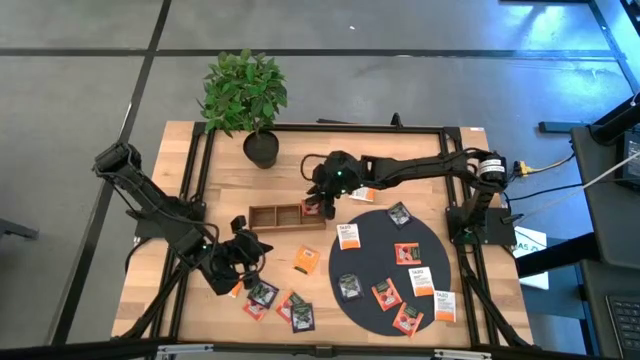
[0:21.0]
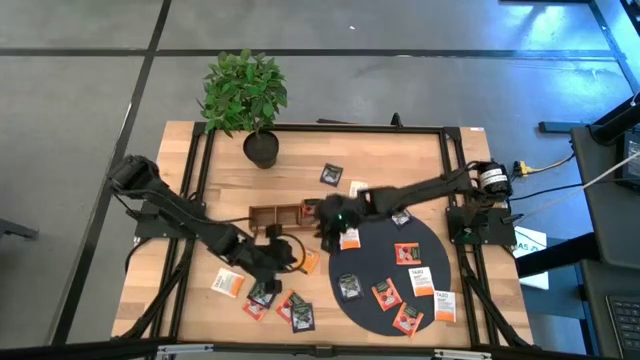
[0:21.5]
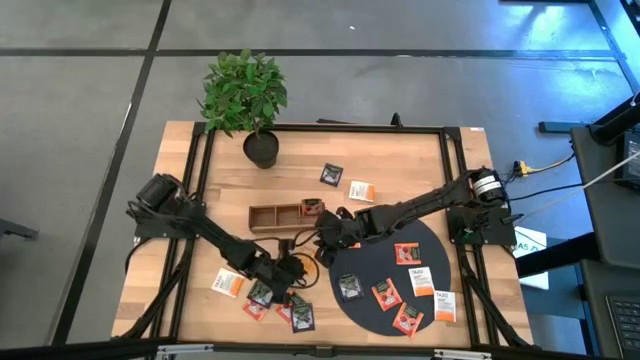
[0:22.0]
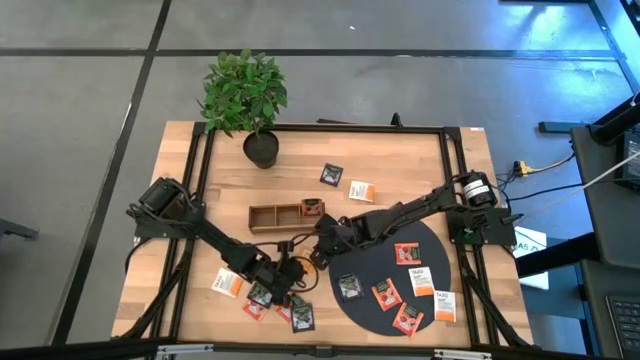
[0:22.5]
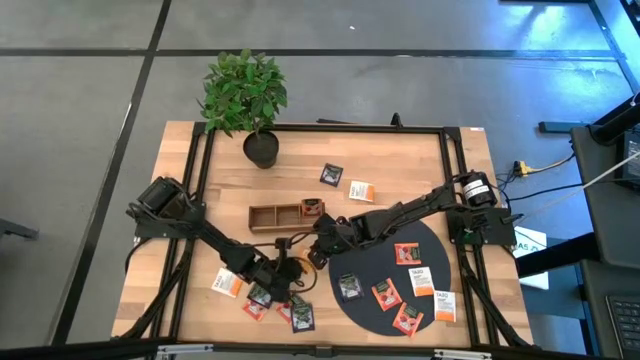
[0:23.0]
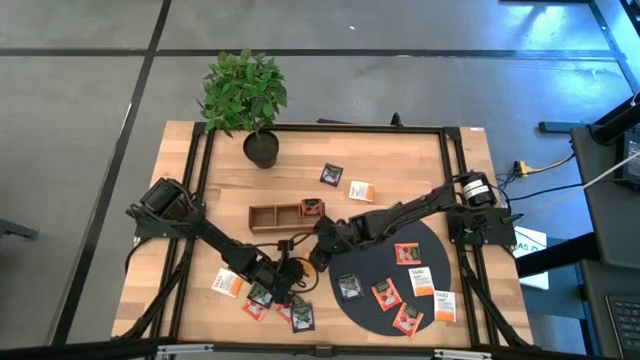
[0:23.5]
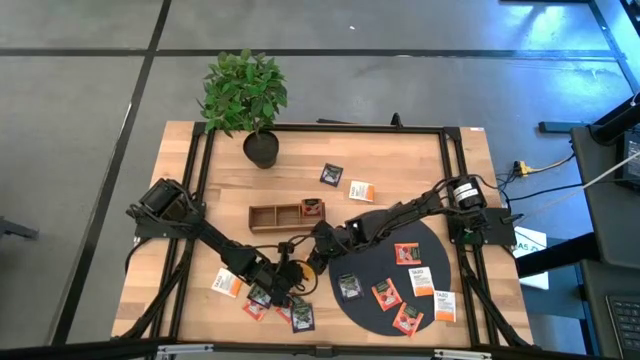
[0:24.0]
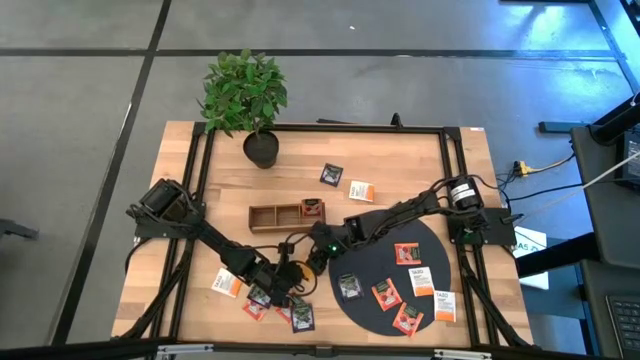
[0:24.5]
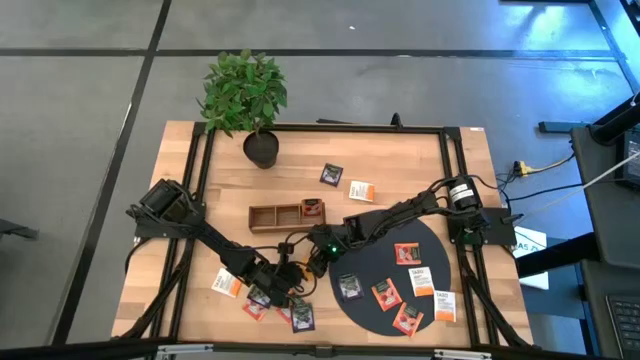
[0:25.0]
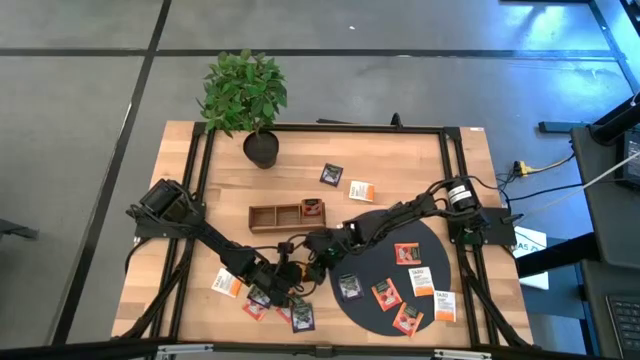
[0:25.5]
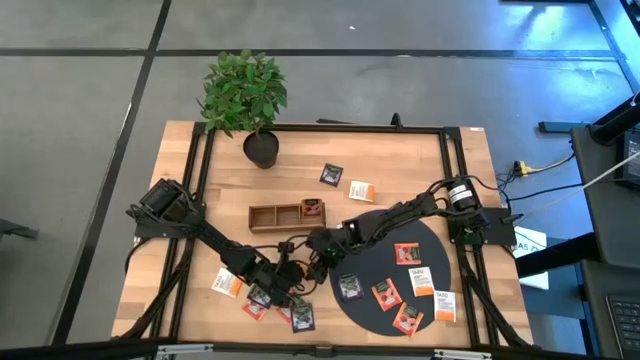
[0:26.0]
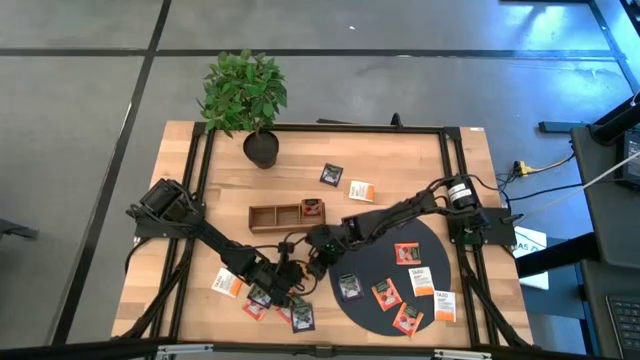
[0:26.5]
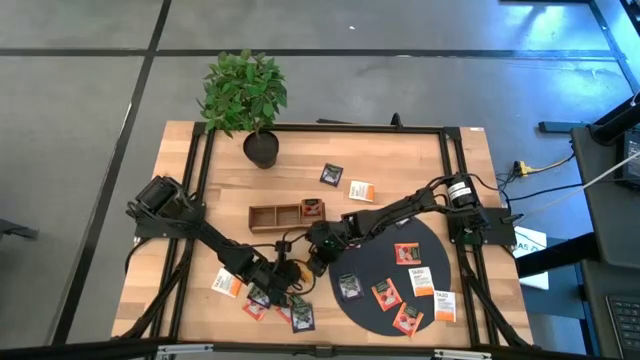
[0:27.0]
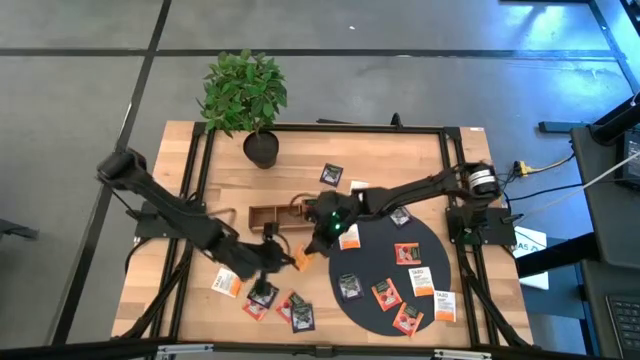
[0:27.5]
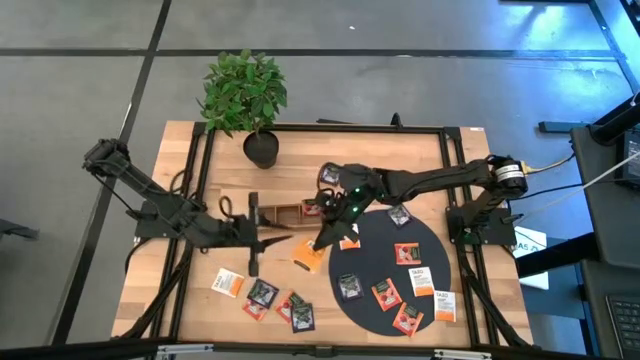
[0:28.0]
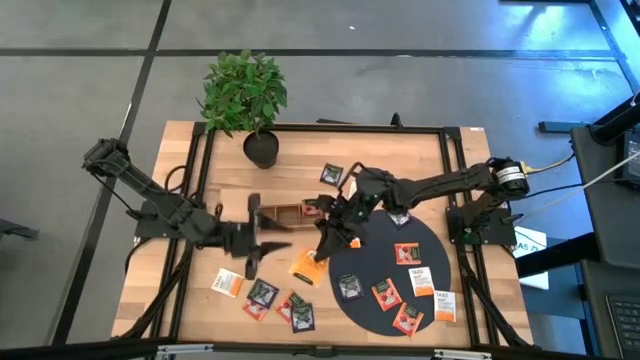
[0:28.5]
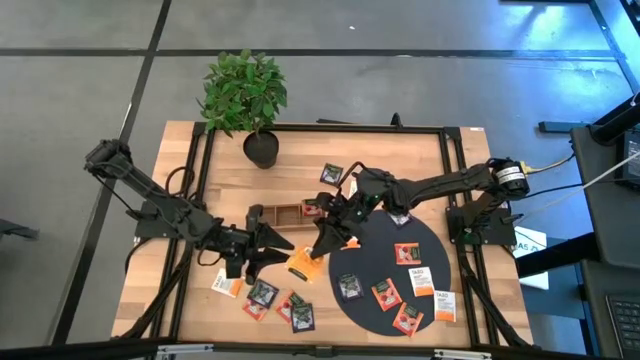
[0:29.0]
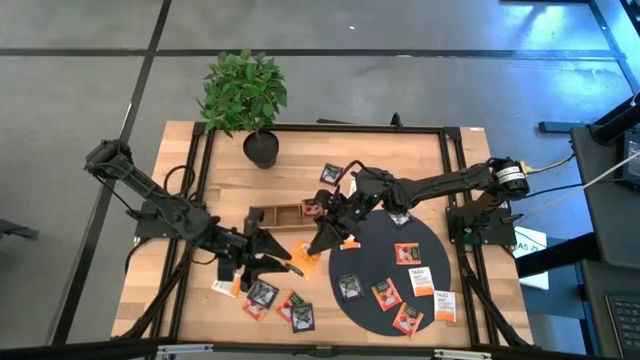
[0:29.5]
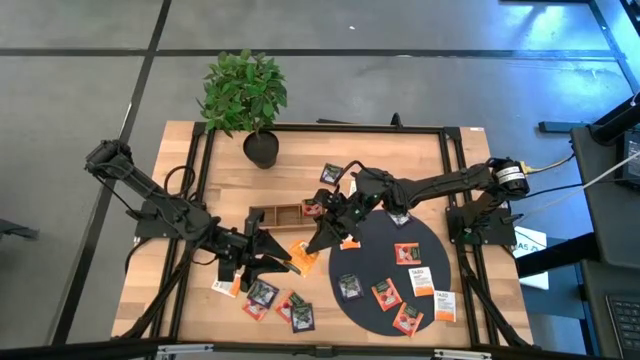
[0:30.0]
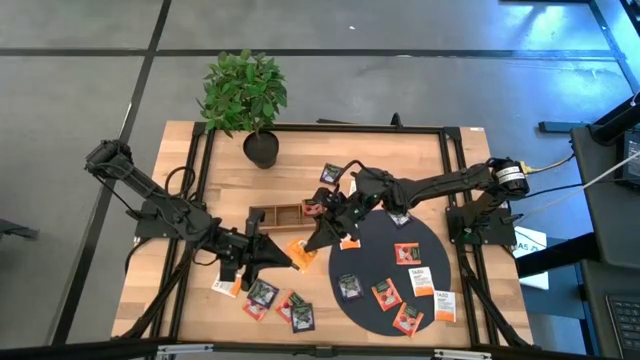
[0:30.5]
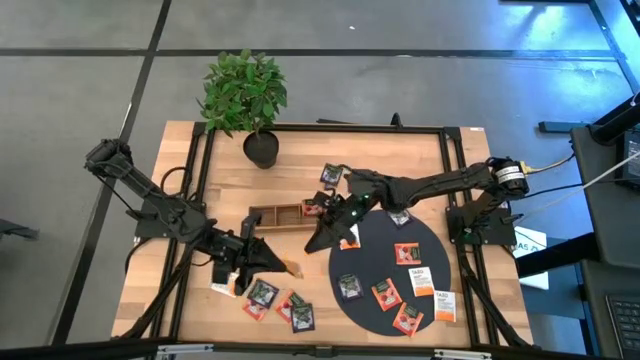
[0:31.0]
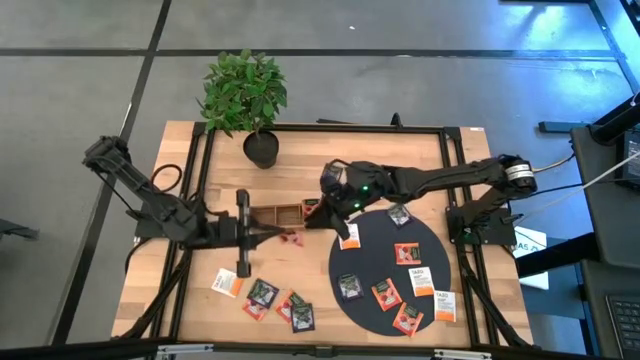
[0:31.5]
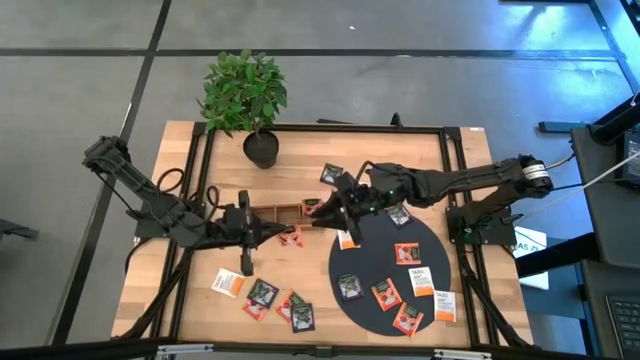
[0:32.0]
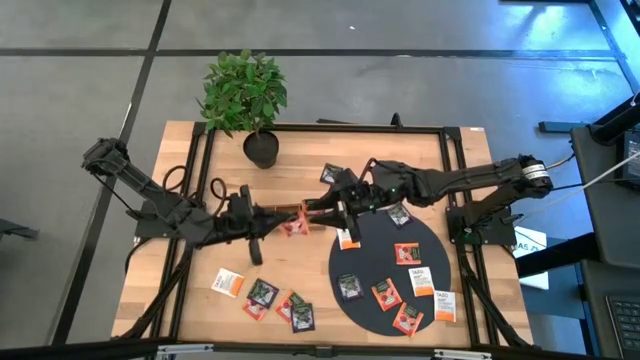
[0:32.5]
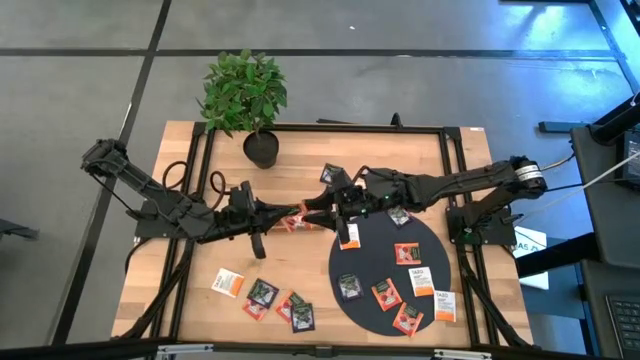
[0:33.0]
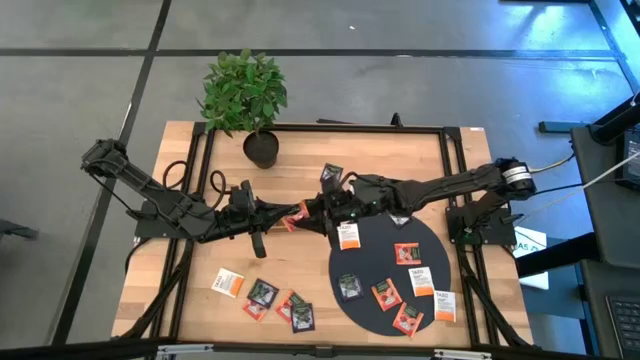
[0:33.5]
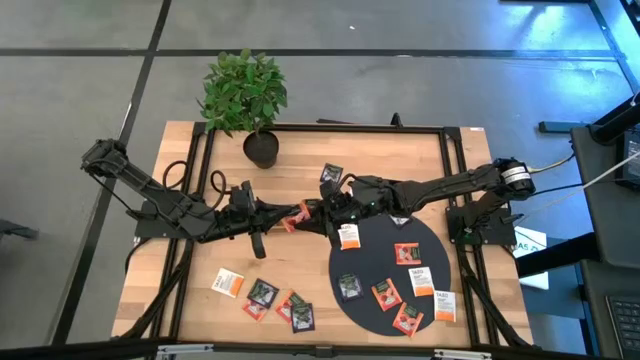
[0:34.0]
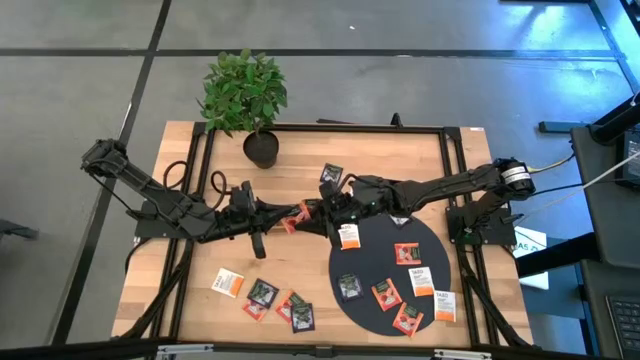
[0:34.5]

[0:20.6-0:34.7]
Task: Pick & Place Tea
Put the orange tea bag into the right section of the wooden organizer

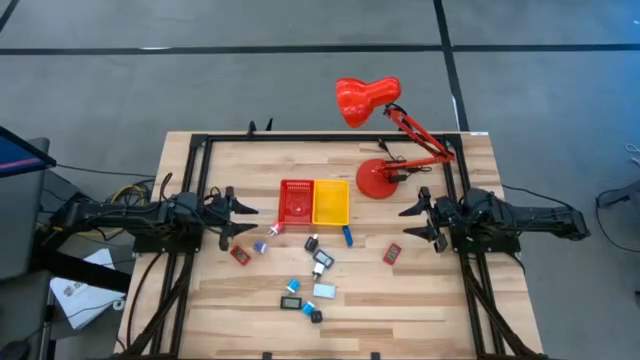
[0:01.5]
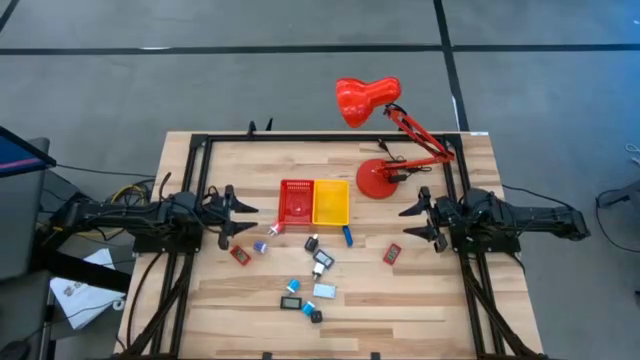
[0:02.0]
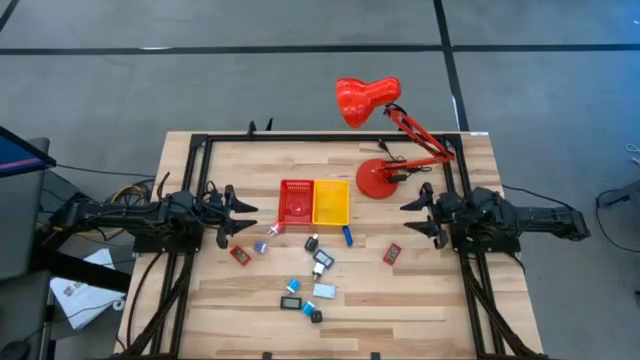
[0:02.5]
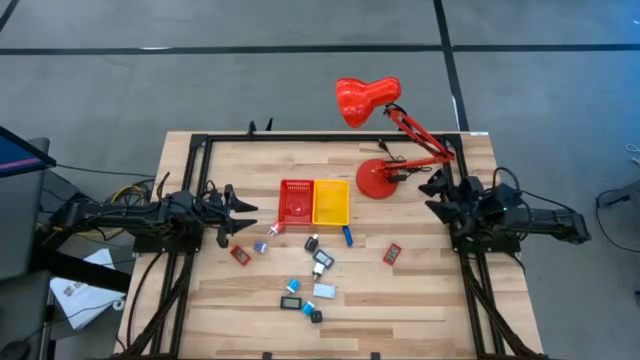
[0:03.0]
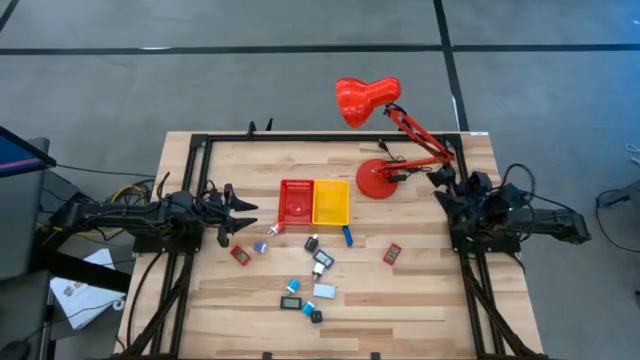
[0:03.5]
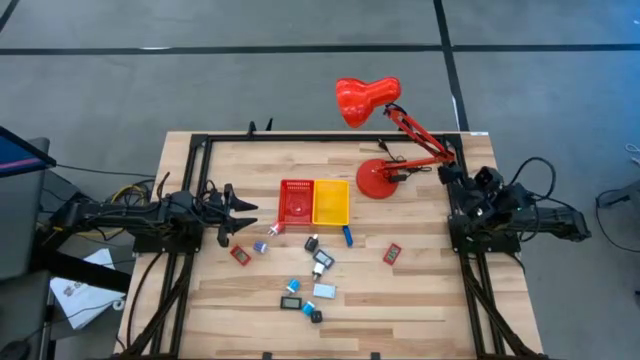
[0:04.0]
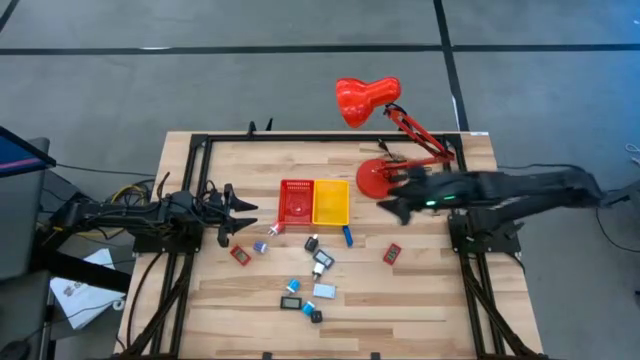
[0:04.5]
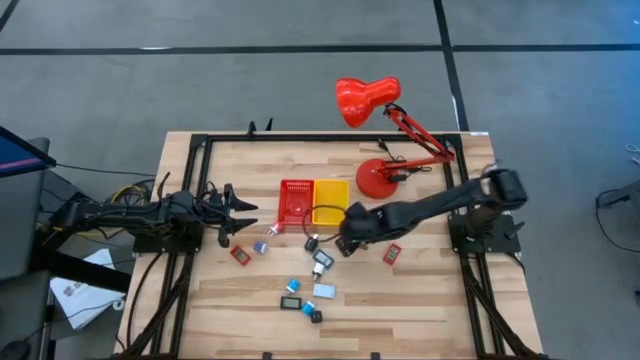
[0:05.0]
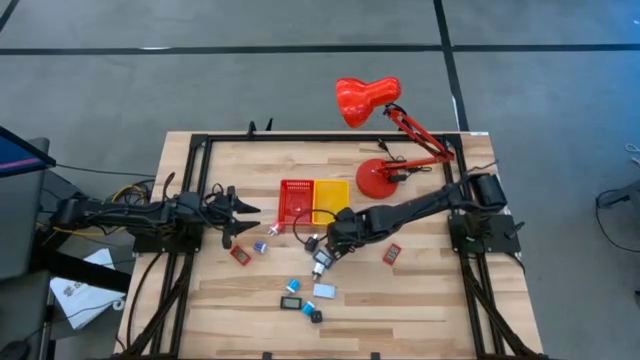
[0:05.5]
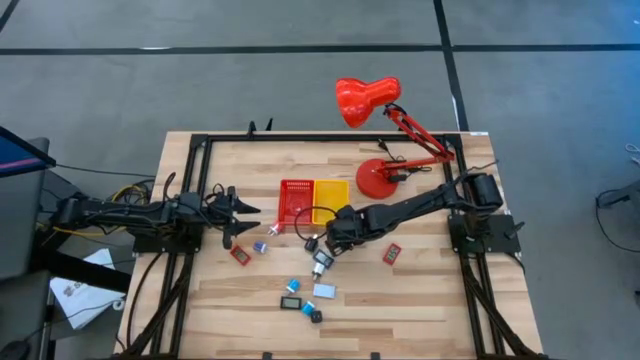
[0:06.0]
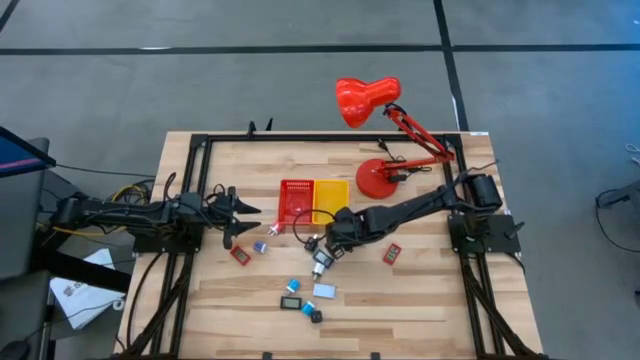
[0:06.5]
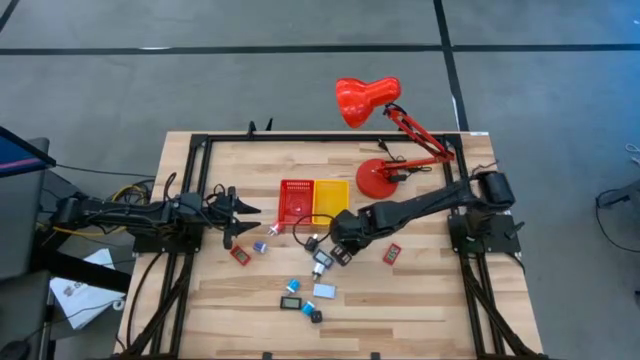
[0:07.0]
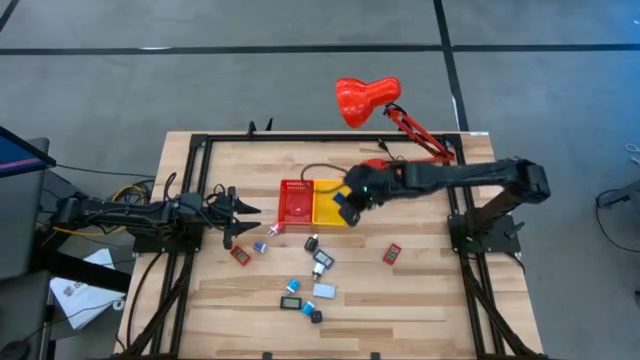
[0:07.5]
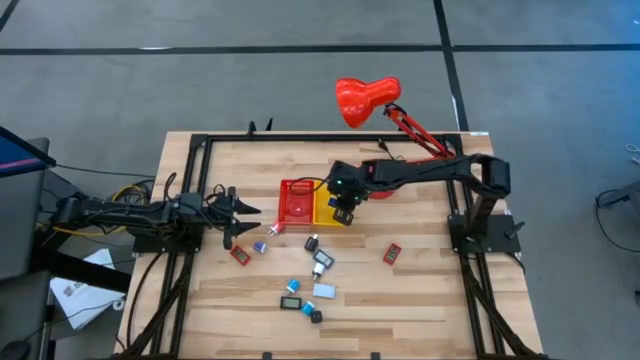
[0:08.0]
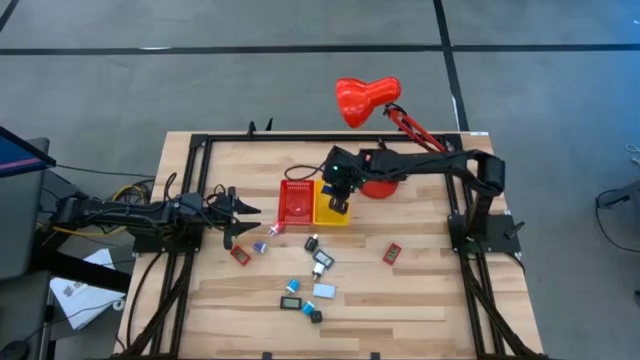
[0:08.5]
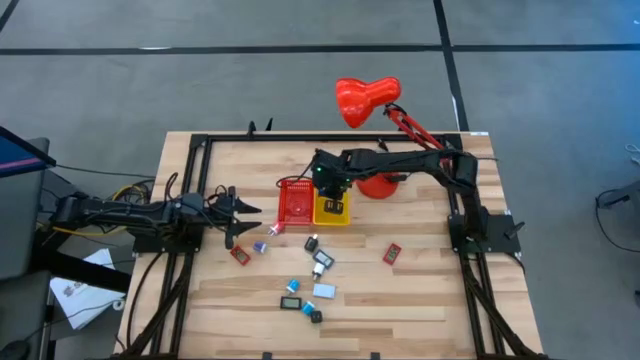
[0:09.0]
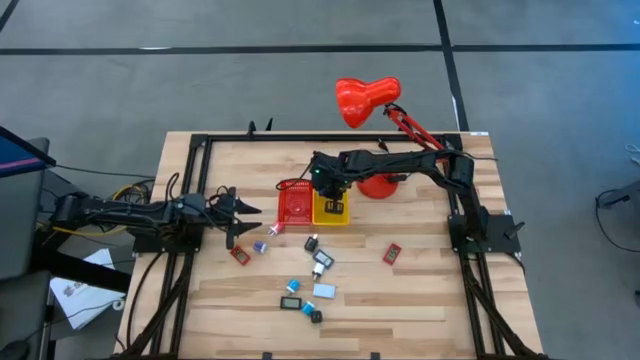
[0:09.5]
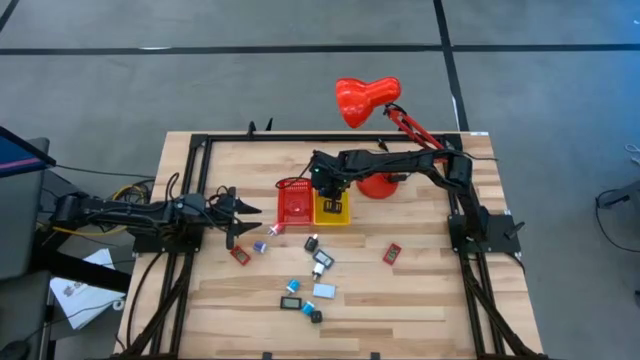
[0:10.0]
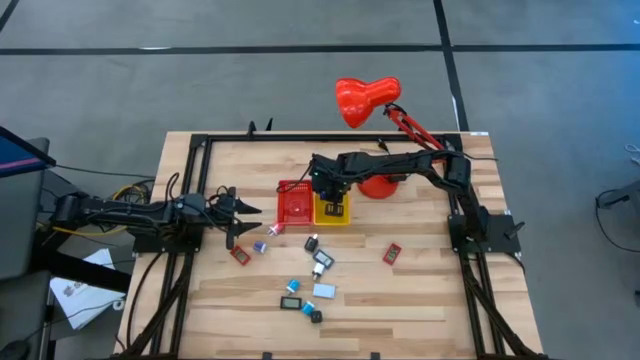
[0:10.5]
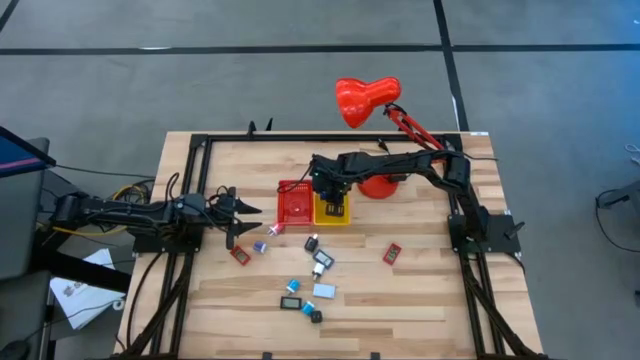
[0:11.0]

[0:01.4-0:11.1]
Task: Pick & Place Office items
Put the top blue digital timer into the yellow basket
